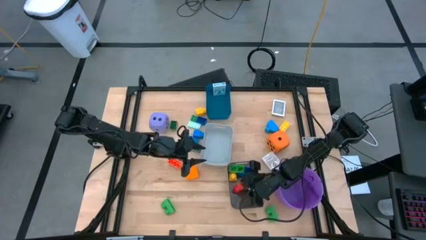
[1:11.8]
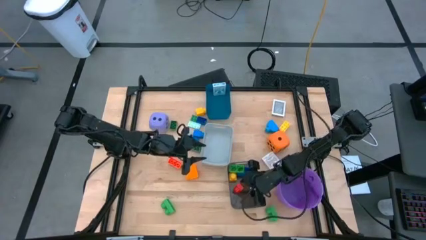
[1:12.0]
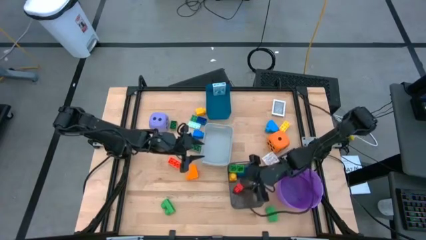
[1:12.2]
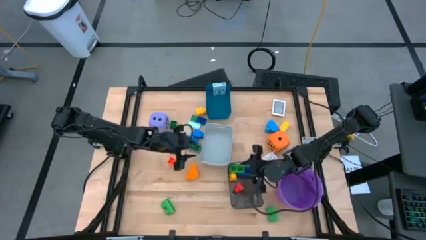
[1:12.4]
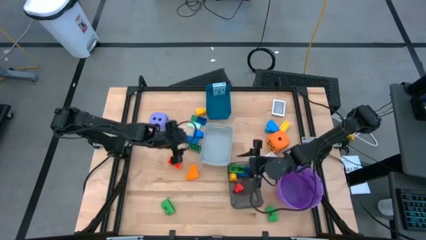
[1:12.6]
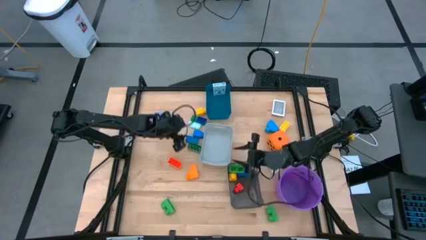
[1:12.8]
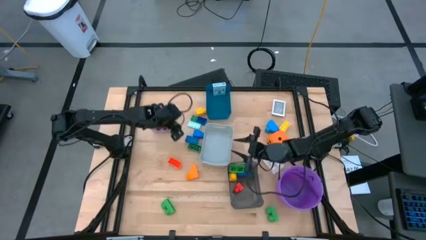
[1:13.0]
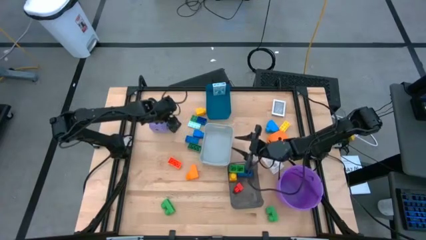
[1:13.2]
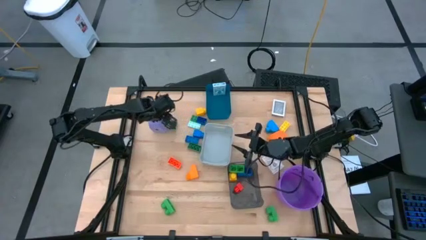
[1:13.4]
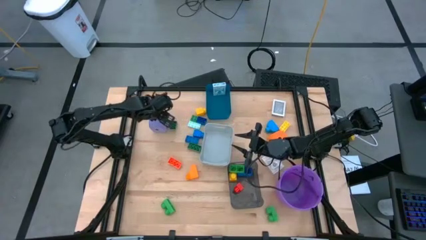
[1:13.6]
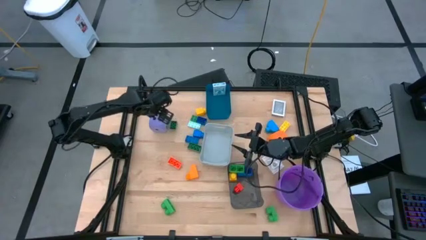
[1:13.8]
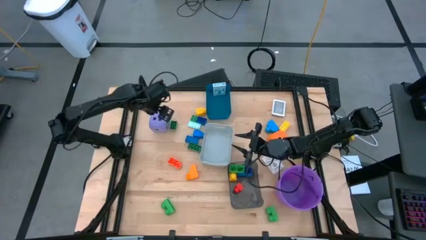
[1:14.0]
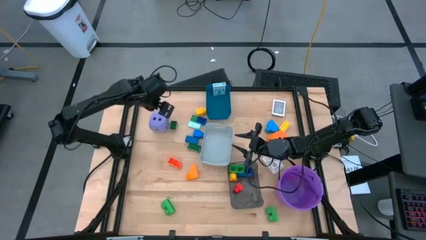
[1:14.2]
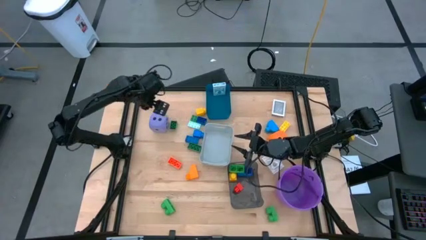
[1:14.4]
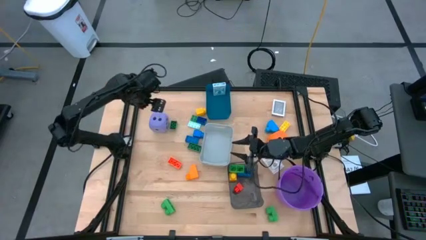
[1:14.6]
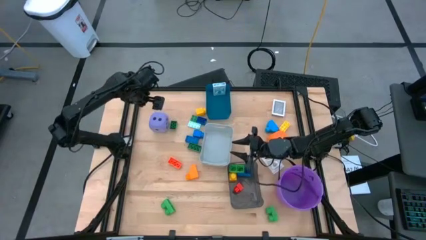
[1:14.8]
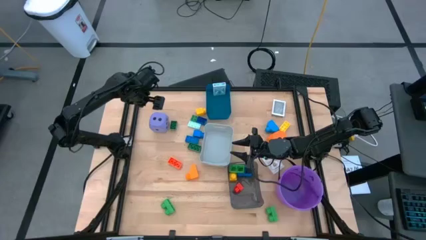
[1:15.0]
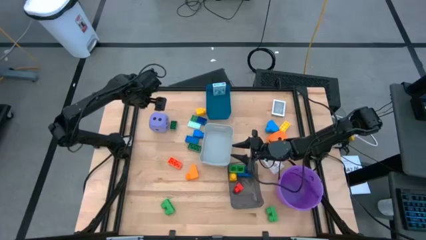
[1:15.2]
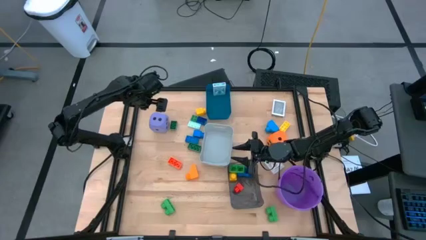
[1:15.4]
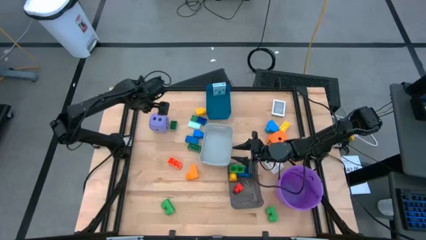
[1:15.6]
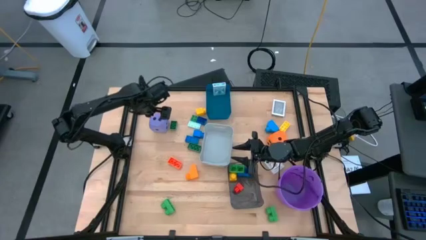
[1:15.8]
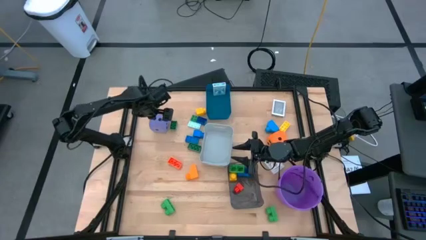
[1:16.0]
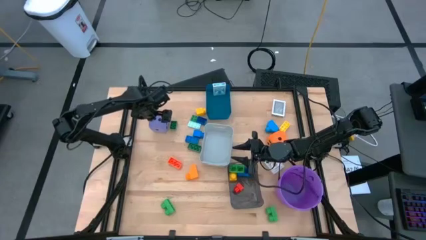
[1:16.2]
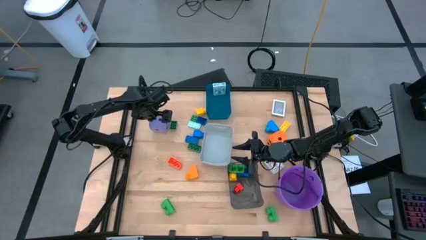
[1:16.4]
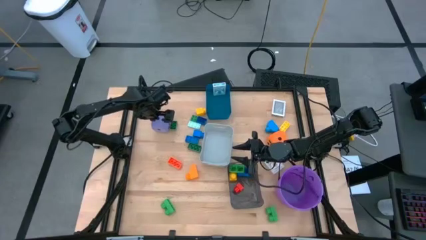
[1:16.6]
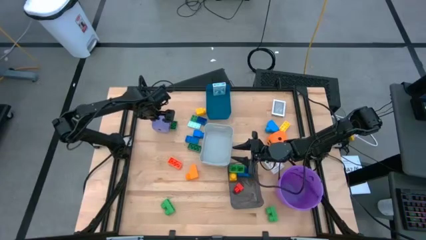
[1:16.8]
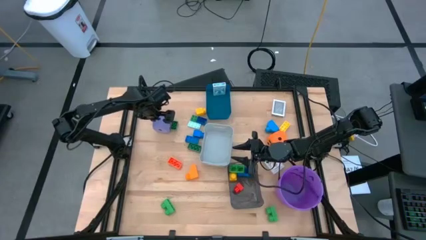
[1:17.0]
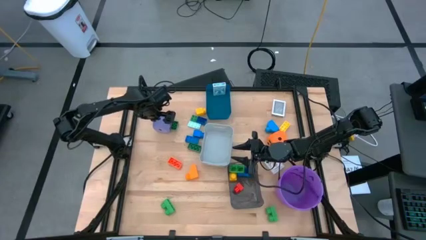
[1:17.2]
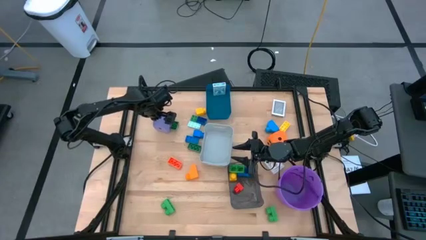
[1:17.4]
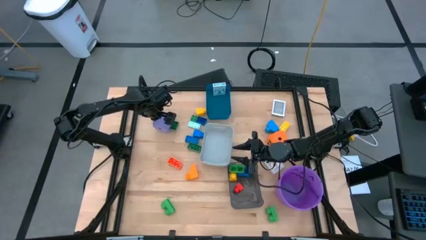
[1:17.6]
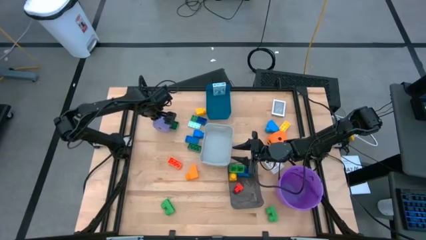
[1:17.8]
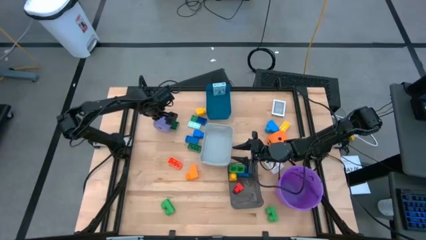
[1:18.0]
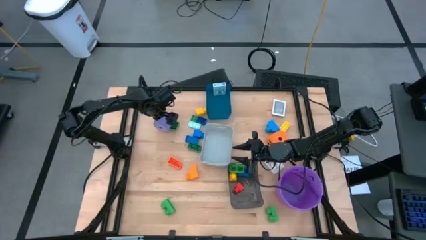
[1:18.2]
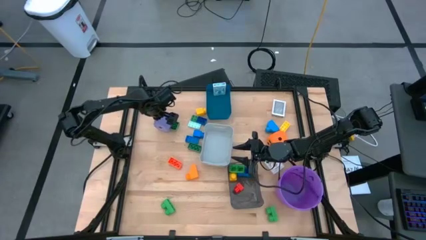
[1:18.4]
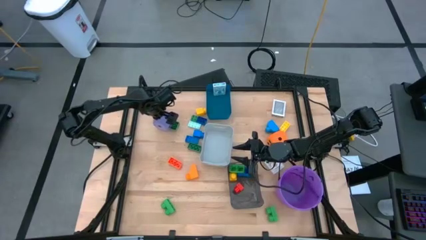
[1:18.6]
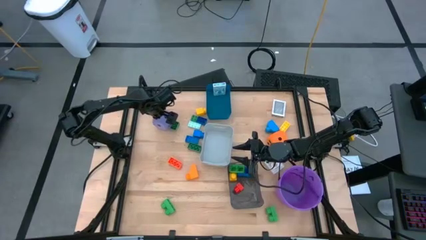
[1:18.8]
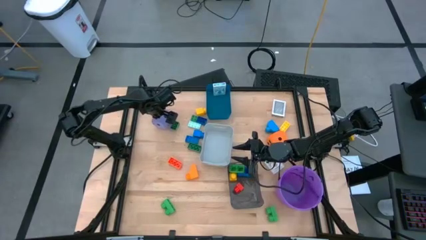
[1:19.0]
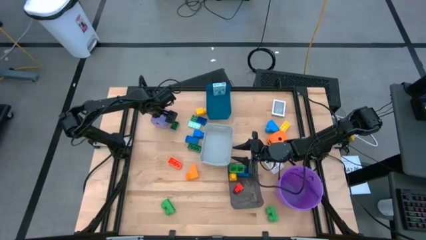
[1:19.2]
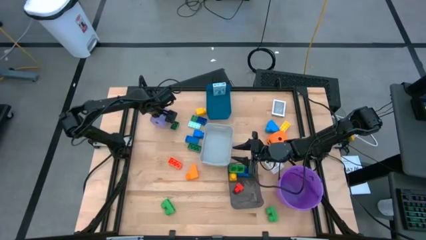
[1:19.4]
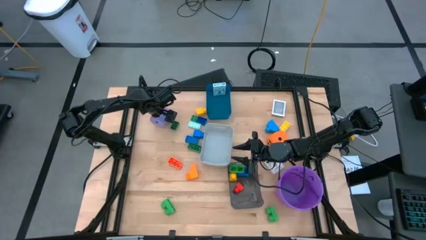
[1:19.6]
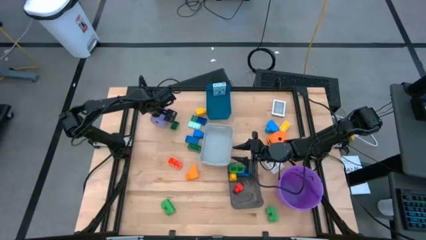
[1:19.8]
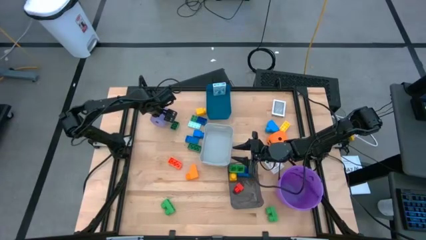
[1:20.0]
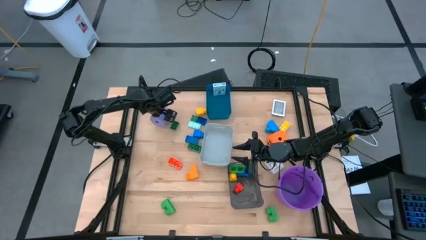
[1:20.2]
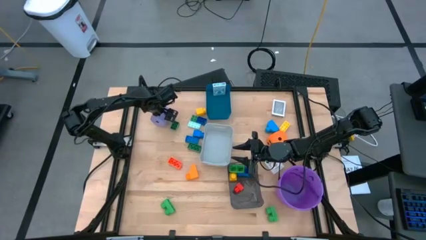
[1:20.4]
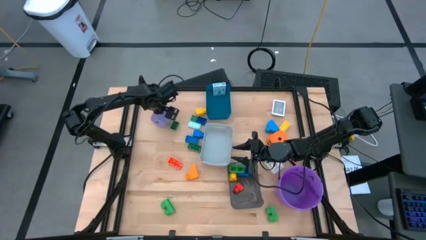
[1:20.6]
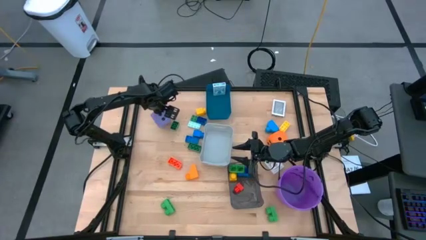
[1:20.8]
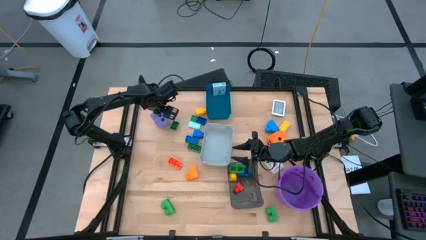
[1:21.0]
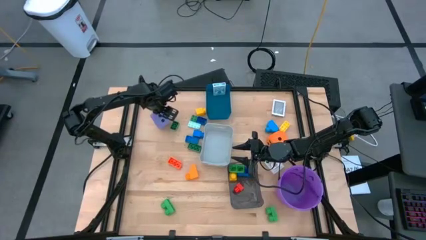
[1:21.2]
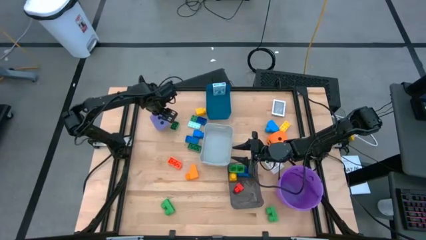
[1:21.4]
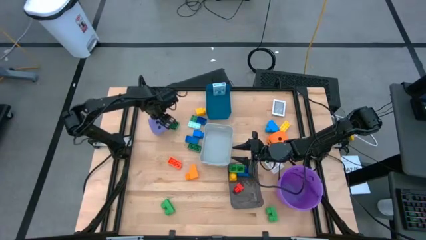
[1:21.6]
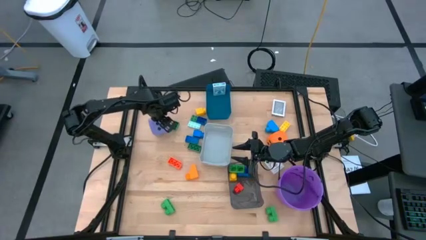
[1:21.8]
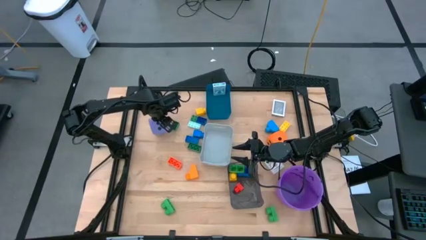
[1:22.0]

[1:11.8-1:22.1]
Task: Pick & Place Toys
Put the purple dice into the white bin

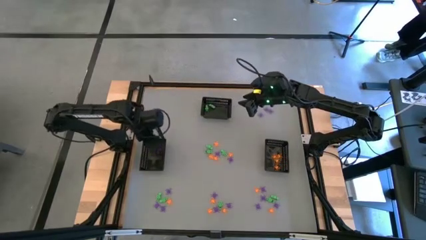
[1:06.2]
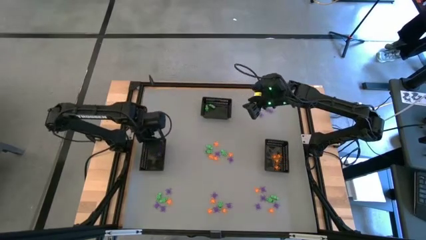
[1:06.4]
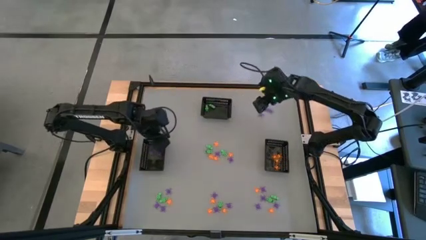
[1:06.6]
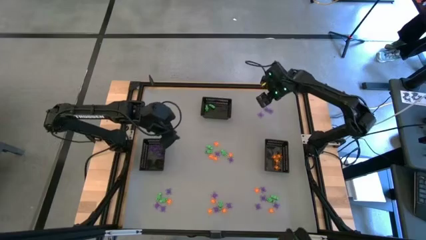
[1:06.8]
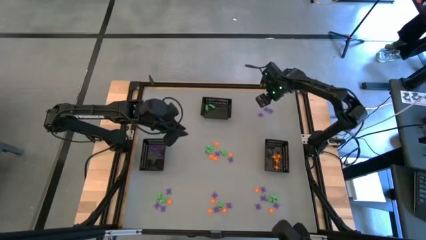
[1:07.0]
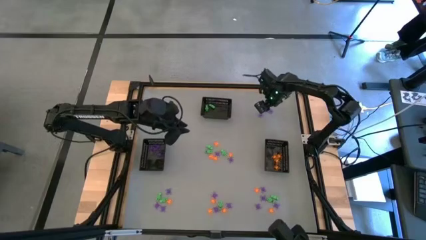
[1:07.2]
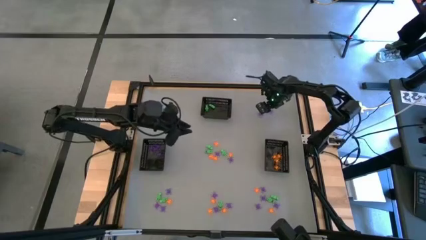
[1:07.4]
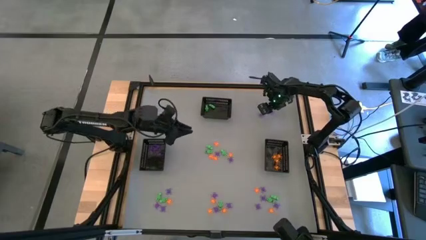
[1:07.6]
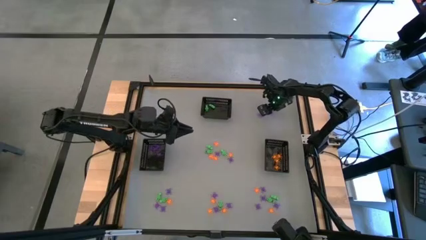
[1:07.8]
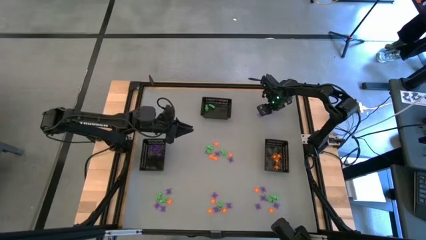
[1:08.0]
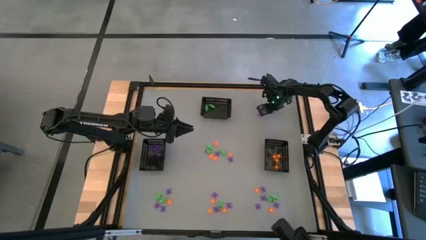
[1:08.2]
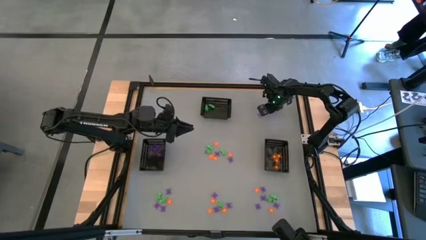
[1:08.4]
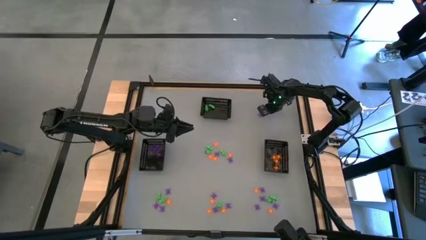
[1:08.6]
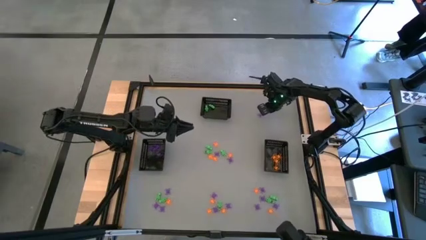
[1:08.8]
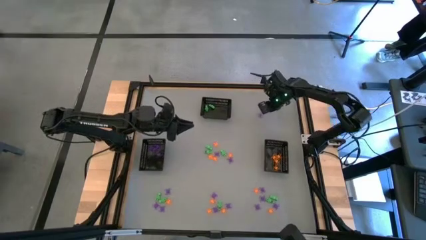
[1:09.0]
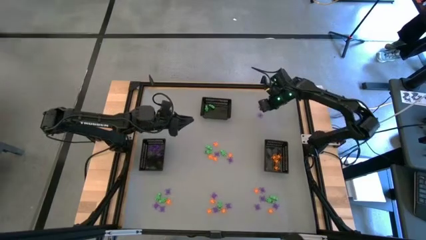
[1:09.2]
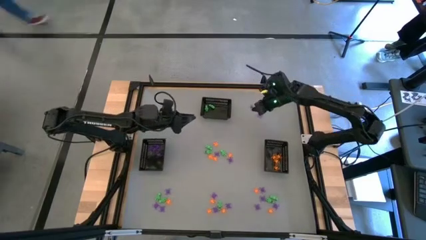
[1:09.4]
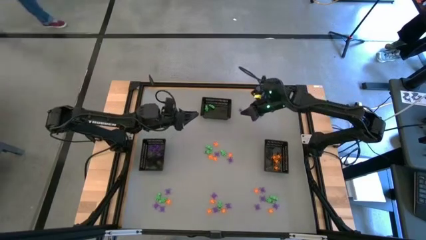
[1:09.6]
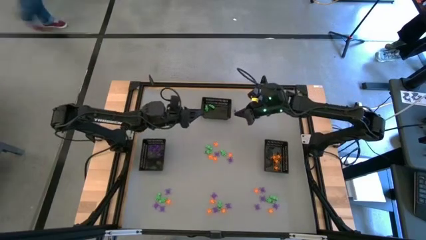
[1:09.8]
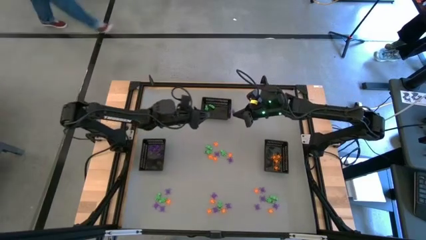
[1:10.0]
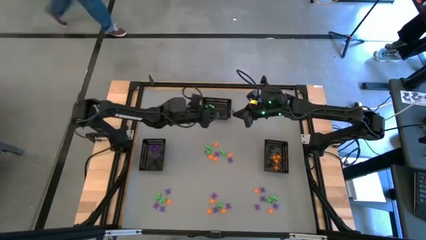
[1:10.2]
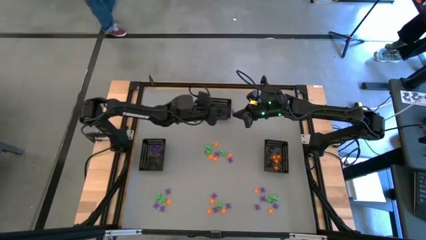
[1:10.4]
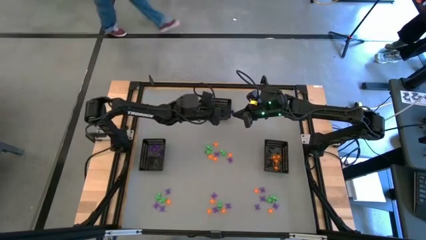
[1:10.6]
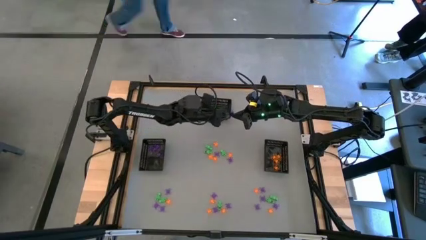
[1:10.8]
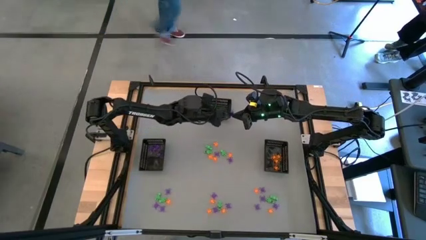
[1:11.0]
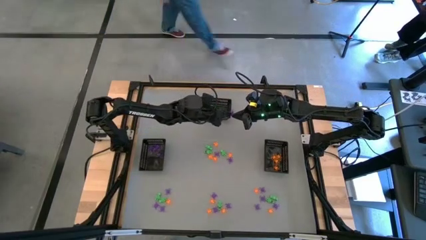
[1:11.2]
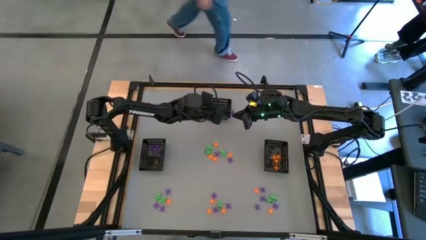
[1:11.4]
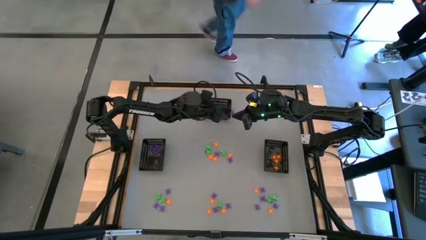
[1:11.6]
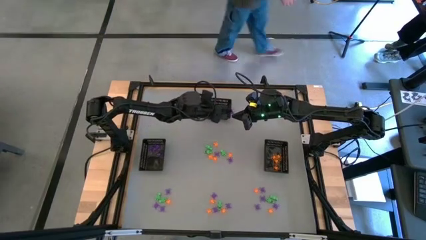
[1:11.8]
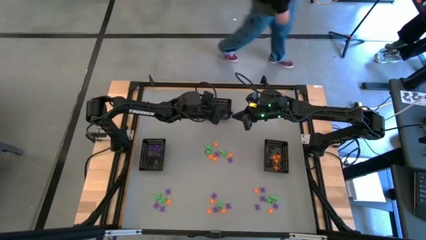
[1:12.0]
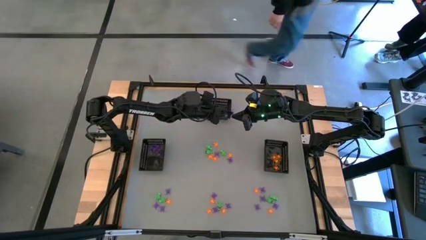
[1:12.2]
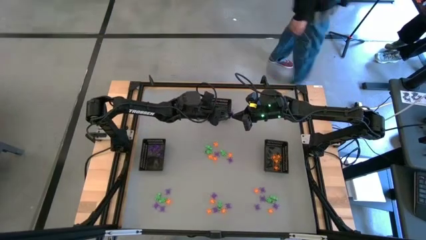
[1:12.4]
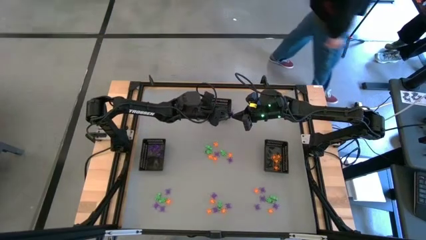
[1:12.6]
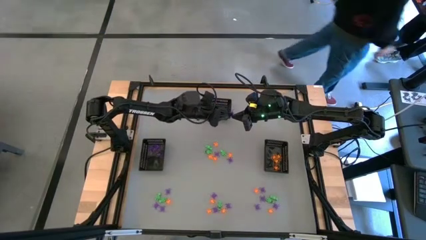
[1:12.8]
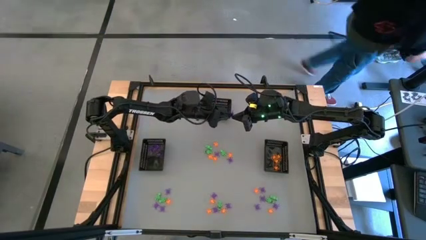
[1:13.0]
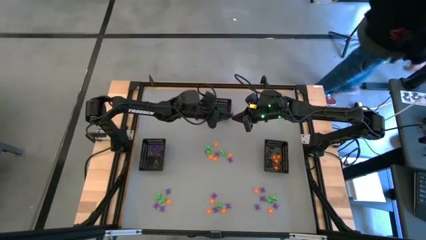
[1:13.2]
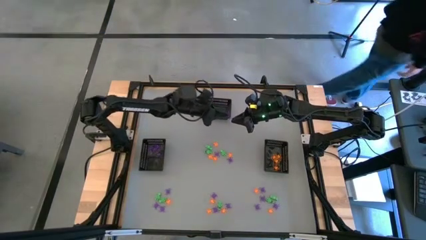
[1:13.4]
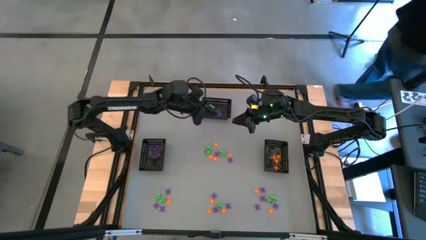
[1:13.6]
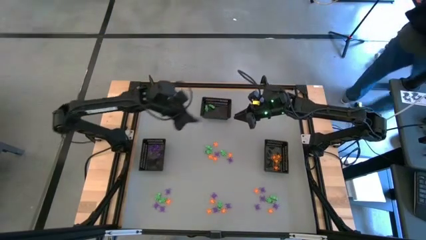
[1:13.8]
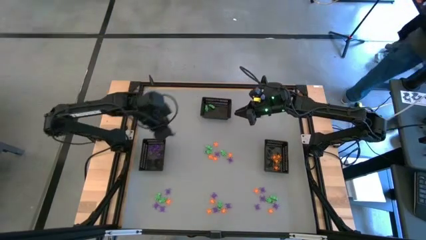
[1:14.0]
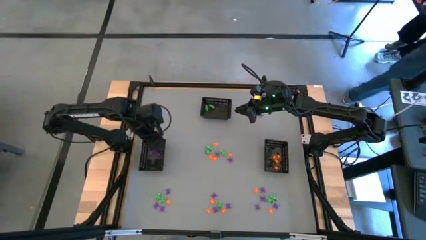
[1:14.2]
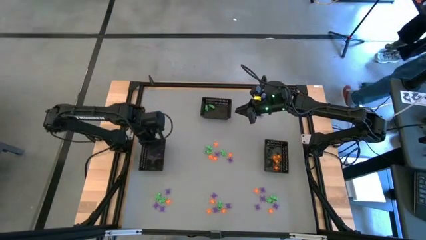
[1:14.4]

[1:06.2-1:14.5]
Task: Sort Halloween decoration
Put the violet spider toy into the left bin
